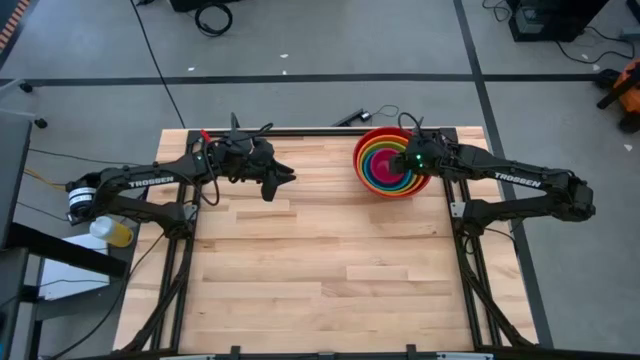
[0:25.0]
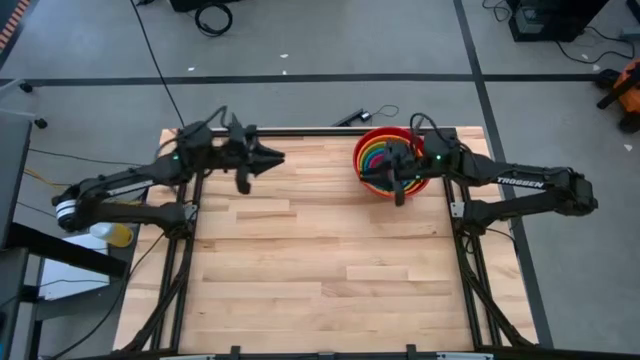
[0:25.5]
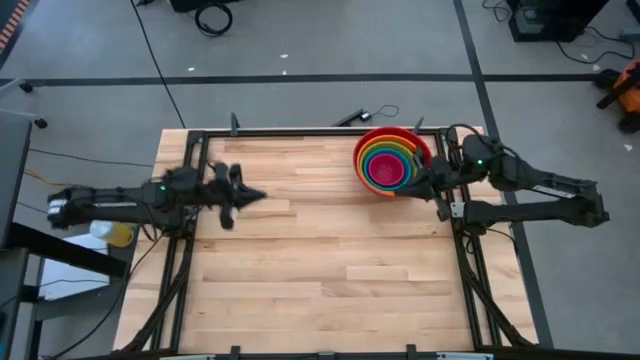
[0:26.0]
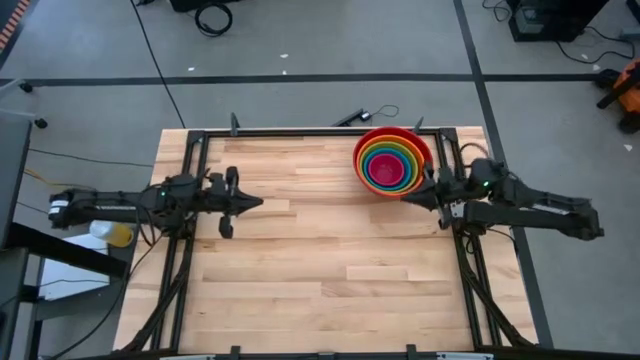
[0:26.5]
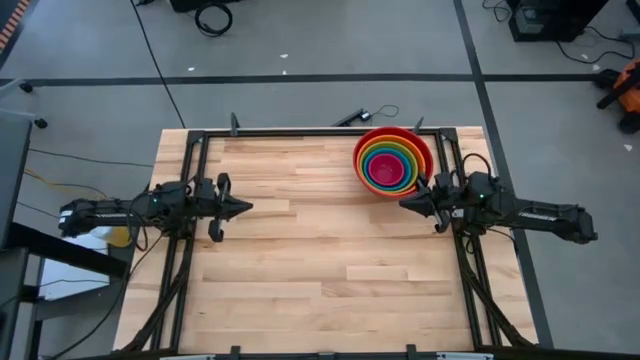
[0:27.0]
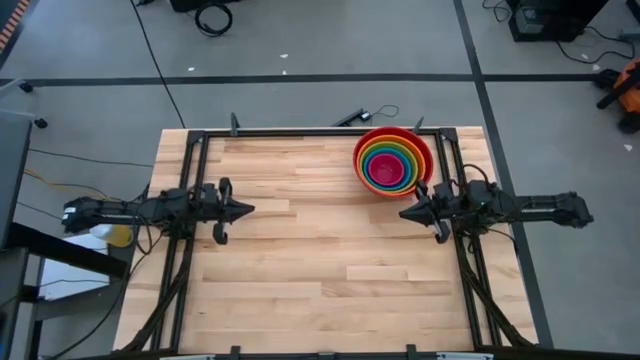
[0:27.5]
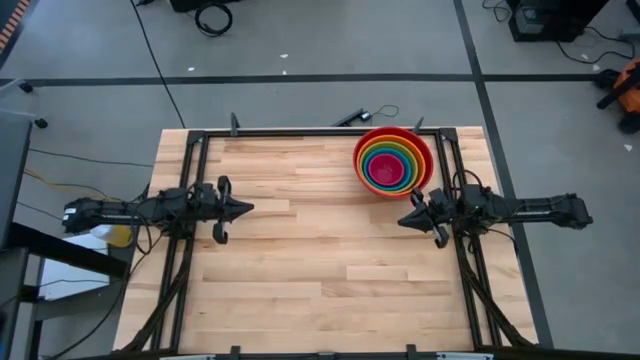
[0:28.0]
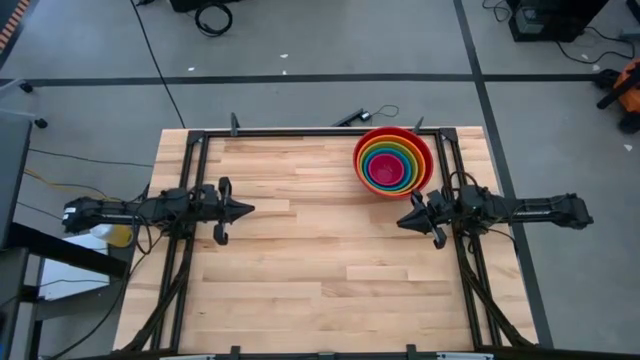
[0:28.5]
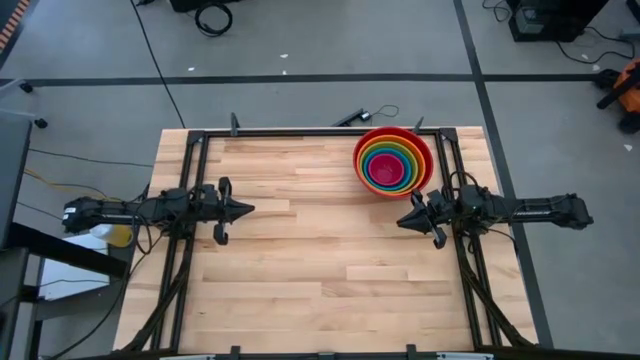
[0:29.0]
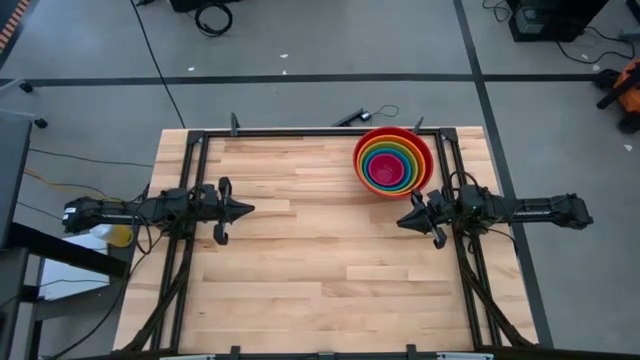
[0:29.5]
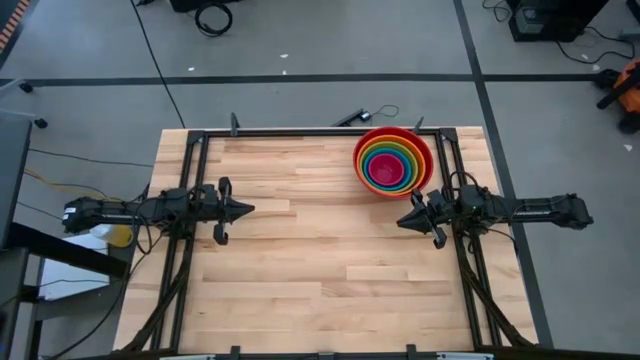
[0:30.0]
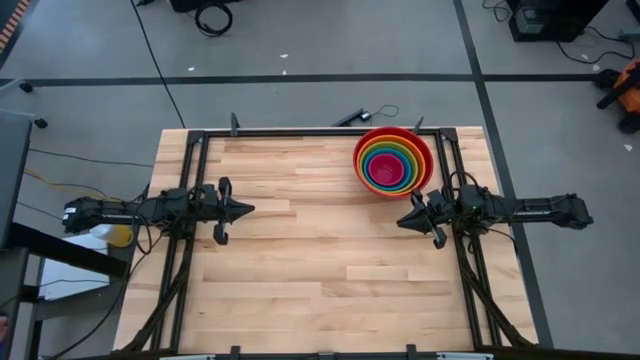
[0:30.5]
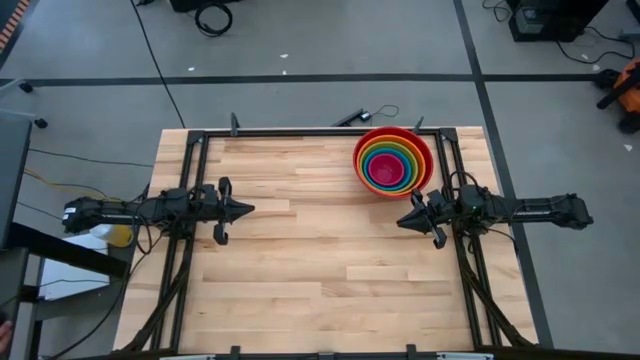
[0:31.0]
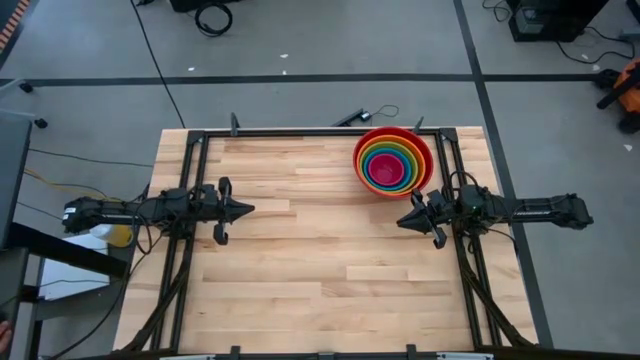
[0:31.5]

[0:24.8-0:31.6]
Return to Home Position

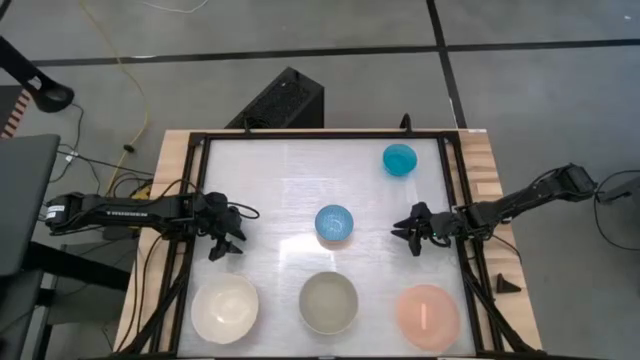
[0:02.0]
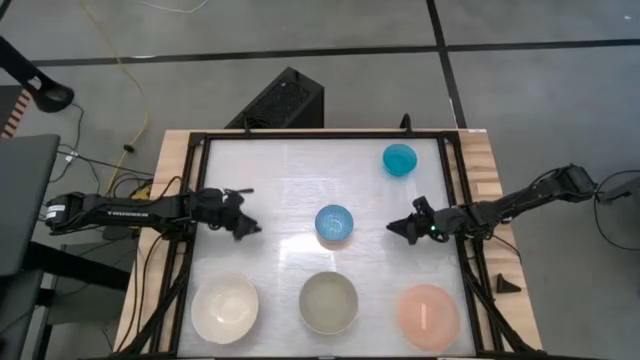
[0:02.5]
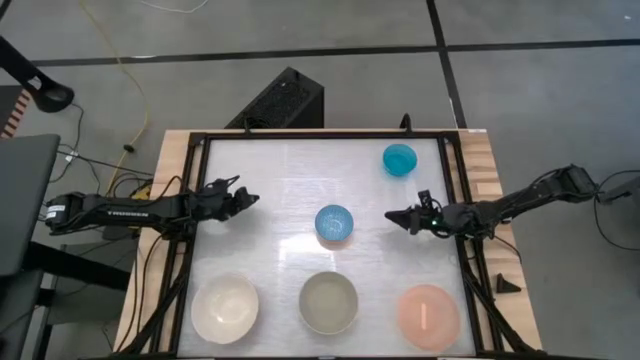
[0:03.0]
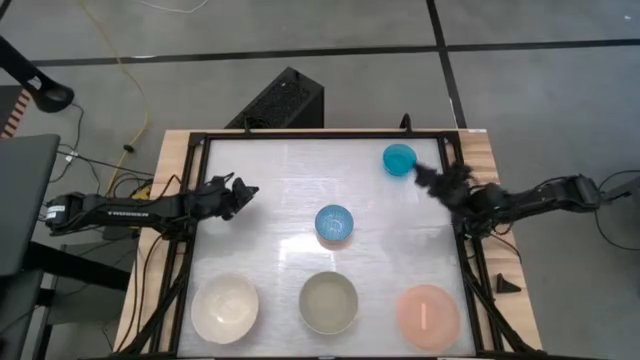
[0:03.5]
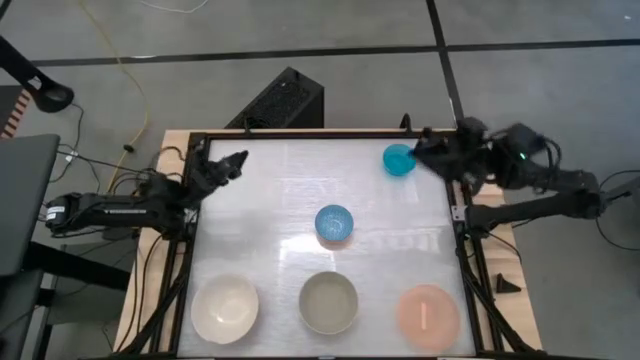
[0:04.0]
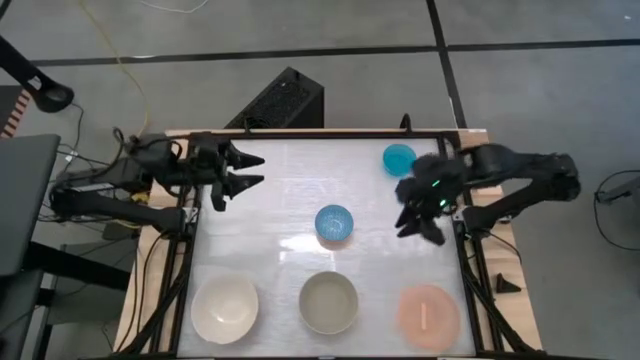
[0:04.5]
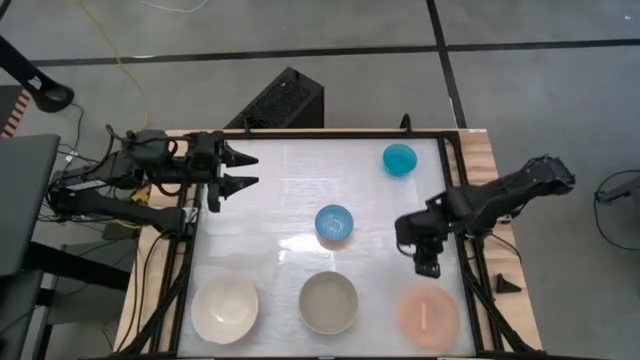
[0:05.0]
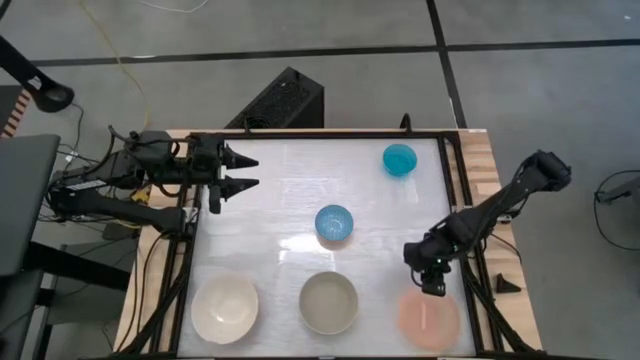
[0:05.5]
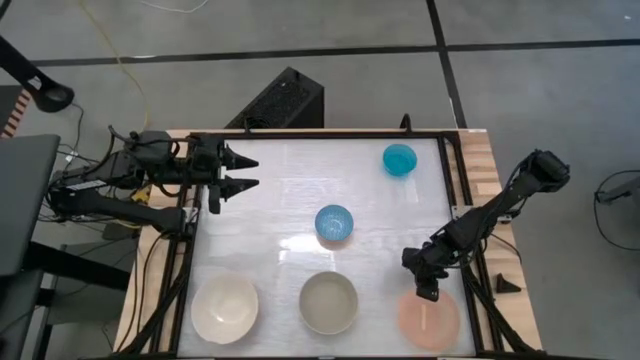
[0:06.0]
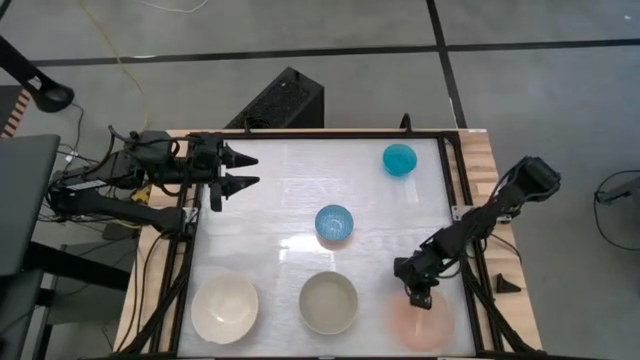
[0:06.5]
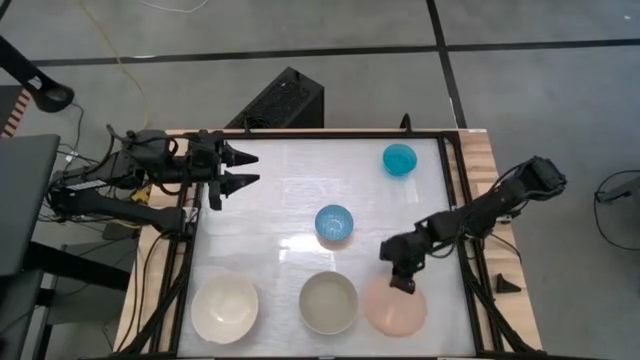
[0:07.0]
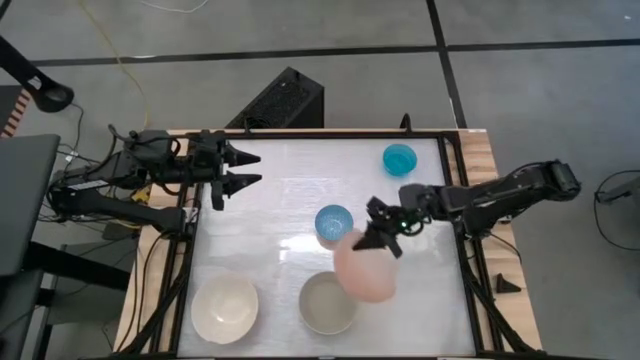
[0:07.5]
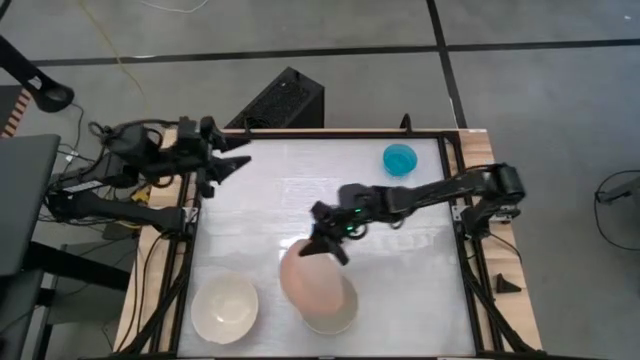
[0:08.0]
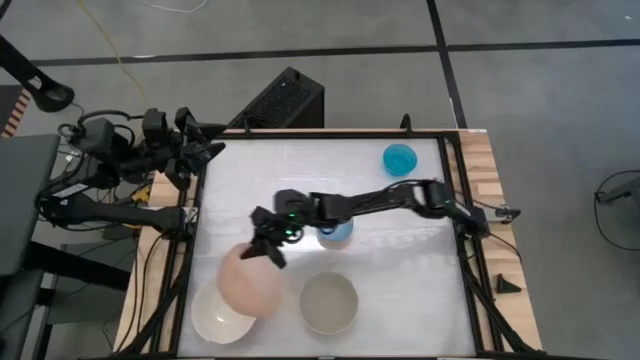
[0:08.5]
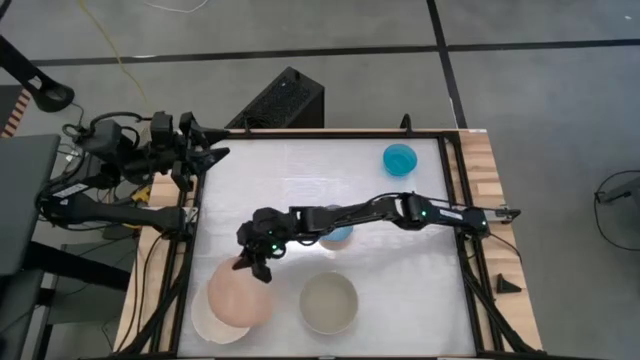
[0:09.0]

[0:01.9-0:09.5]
Stack the orange on top of the white bowl

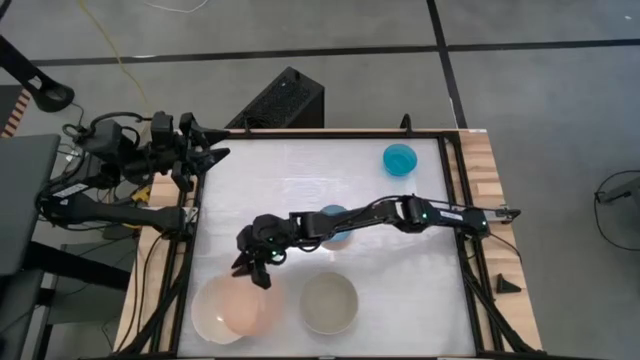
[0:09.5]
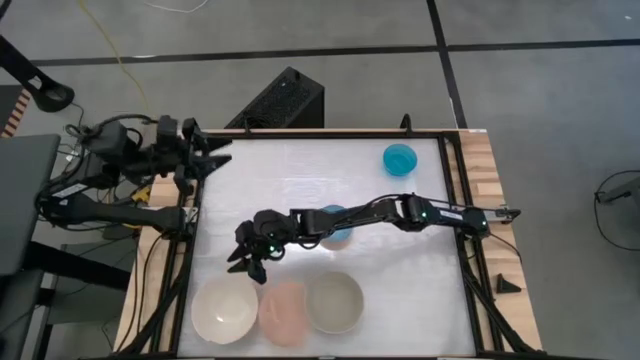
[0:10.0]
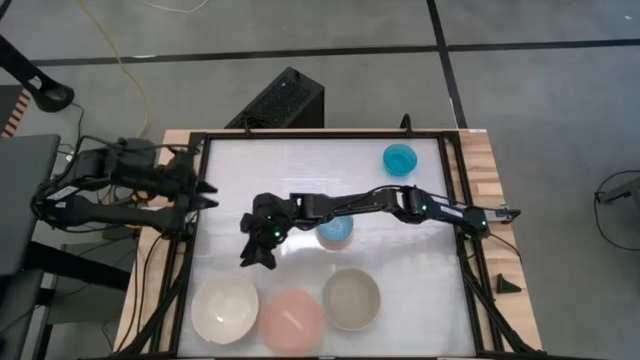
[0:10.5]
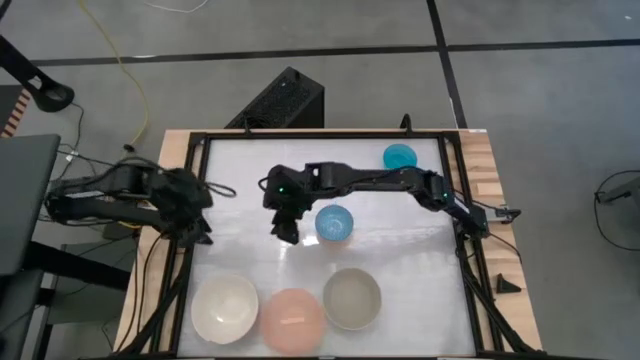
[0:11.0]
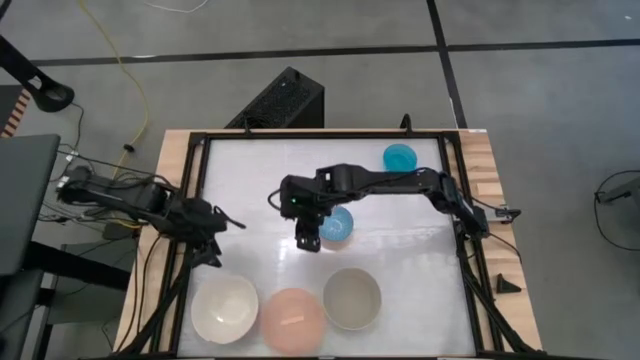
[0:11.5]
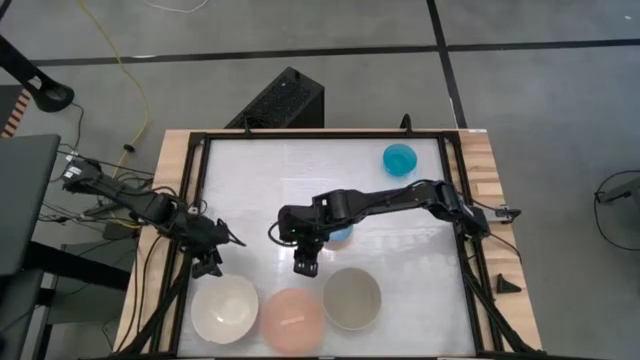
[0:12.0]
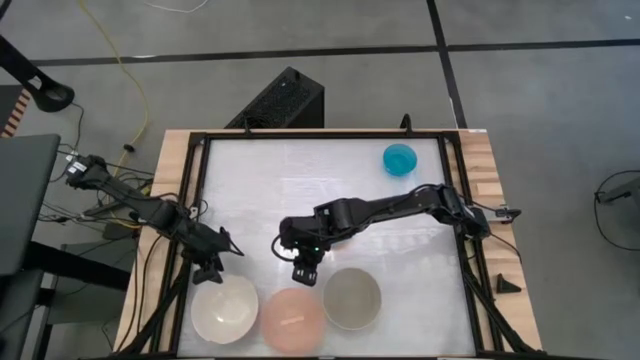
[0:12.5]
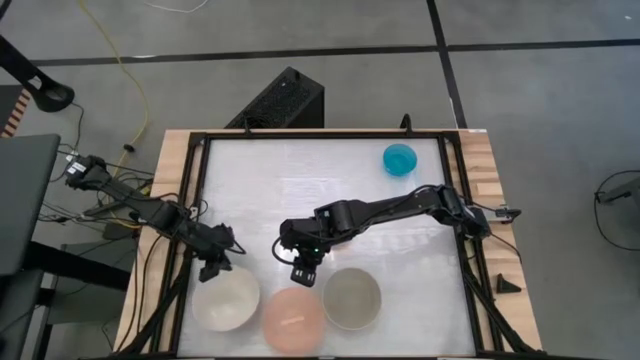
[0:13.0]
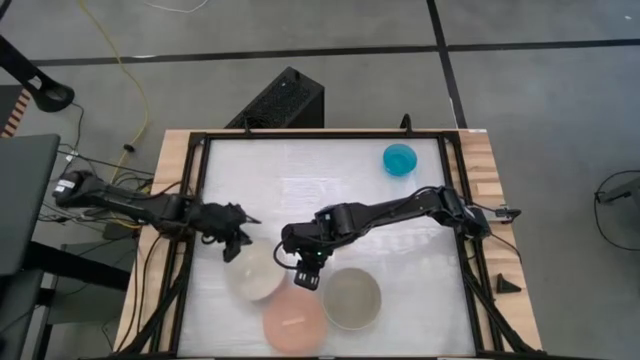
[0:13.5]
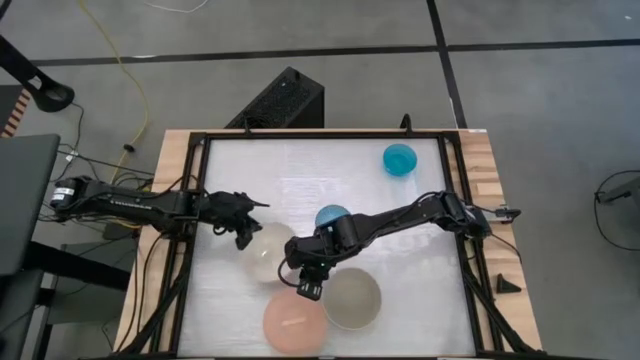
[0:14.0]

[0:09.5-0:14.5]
Adjust the white bowl

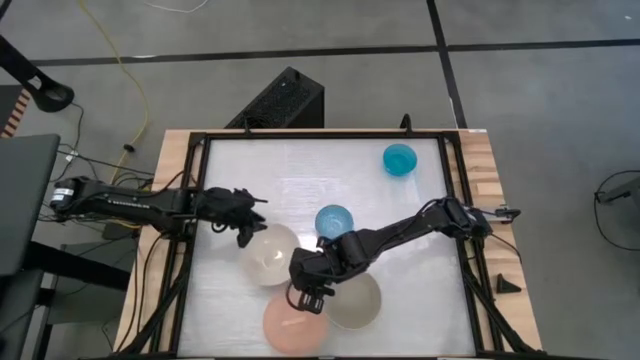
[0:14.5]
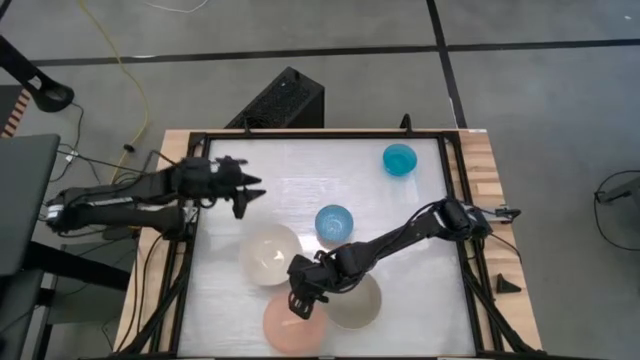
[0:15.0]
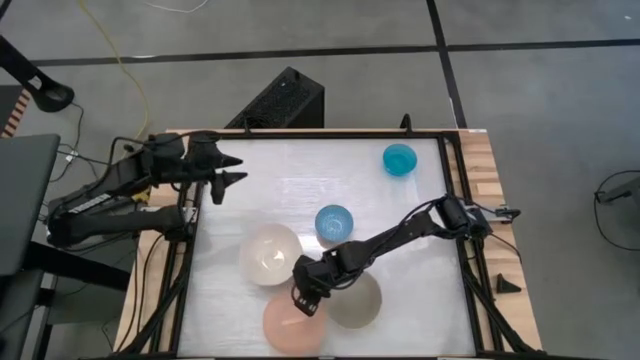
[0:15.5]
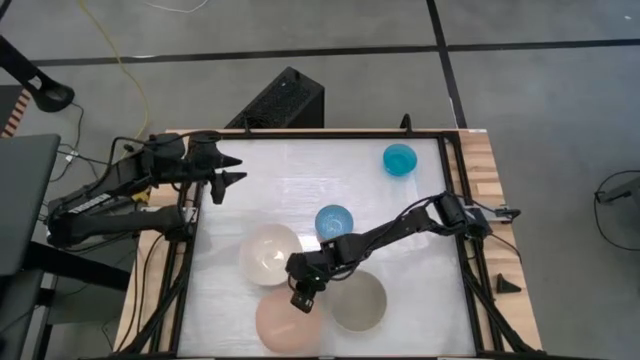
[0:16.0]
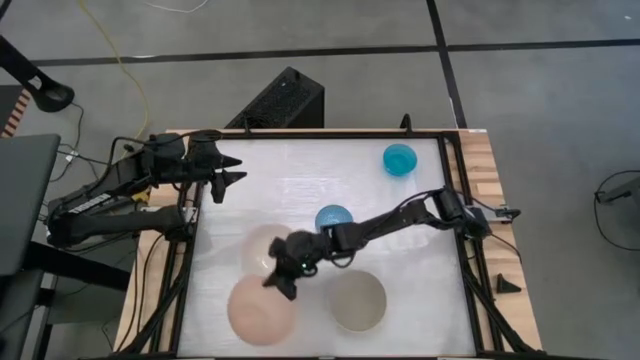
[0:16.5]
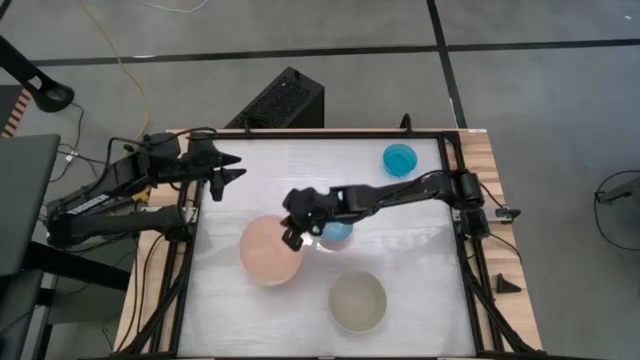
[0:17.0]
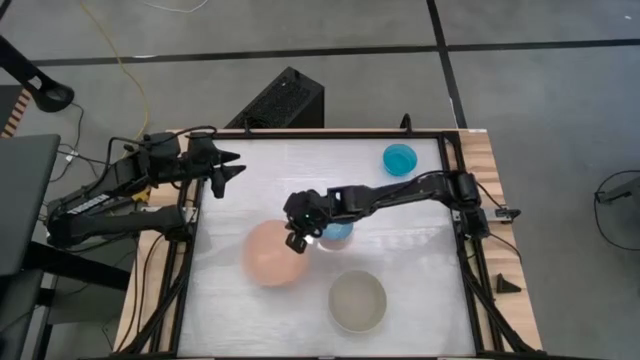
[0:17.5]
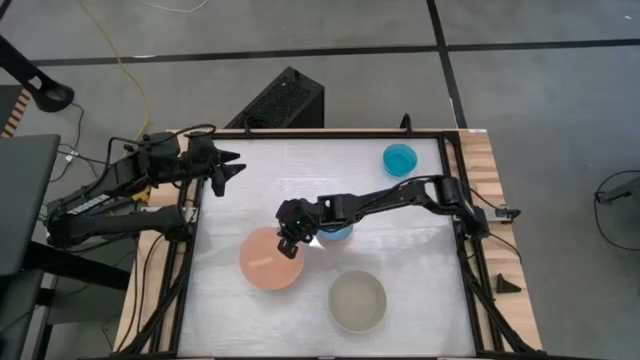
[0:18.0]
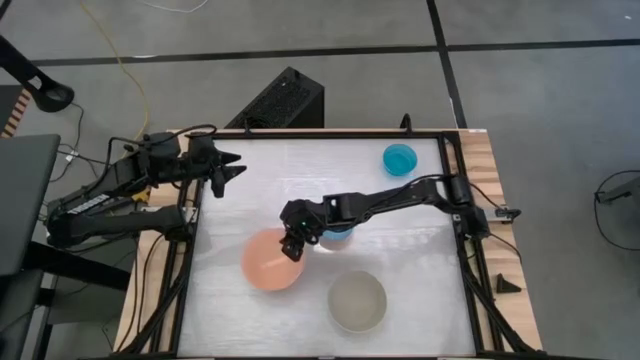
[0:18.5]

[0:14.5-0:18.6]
Stack the orange bowl on top of the white bowl
